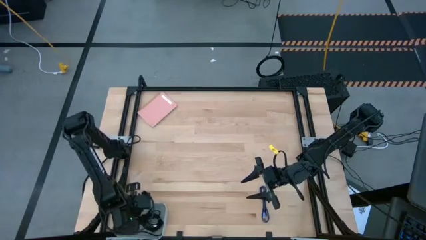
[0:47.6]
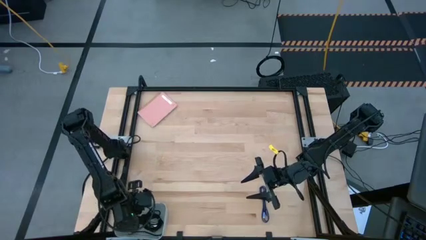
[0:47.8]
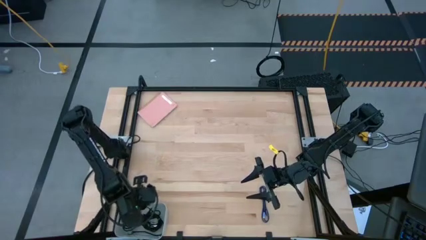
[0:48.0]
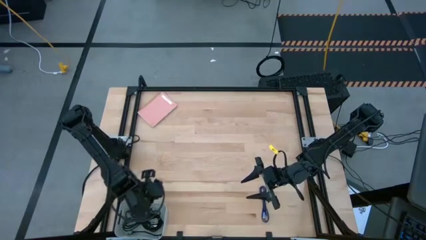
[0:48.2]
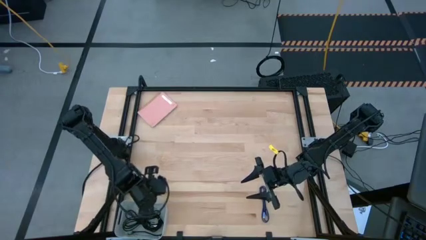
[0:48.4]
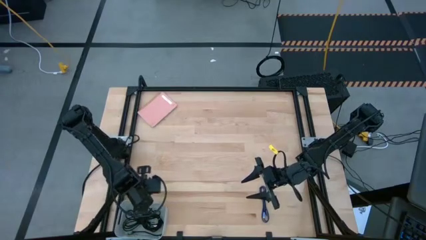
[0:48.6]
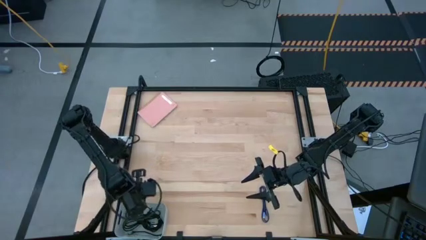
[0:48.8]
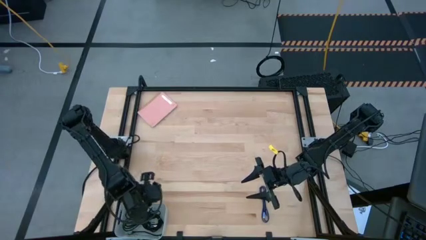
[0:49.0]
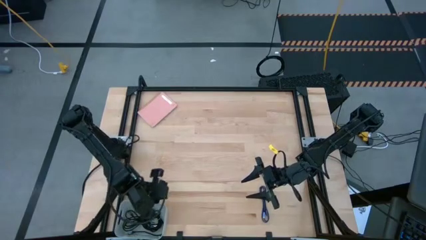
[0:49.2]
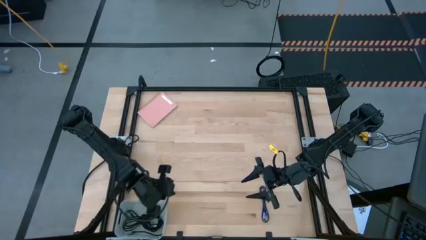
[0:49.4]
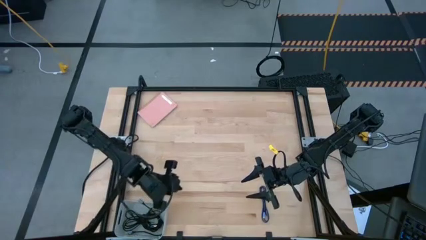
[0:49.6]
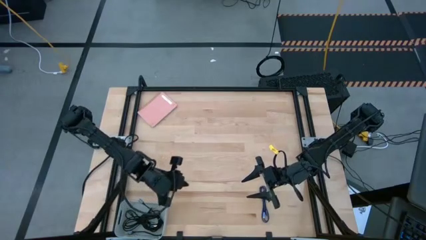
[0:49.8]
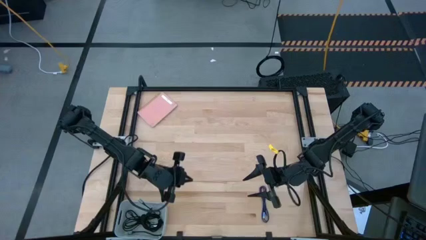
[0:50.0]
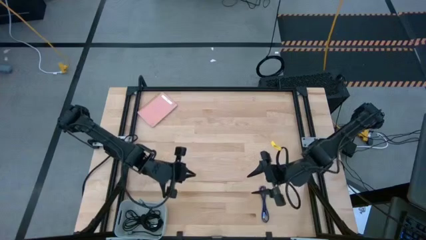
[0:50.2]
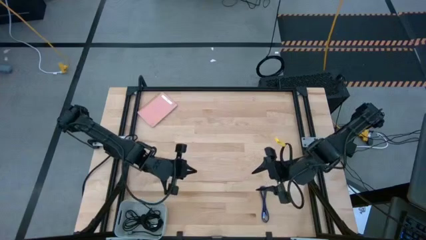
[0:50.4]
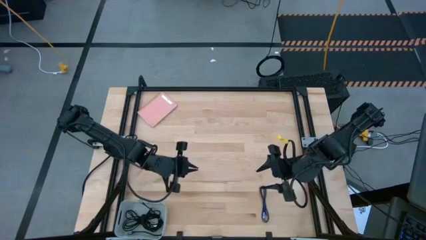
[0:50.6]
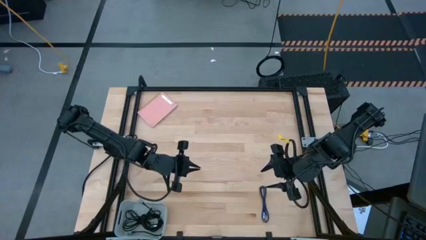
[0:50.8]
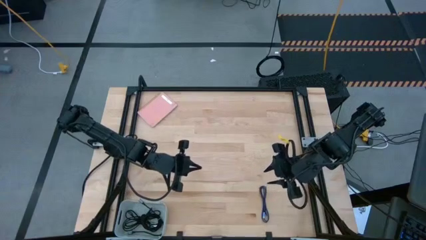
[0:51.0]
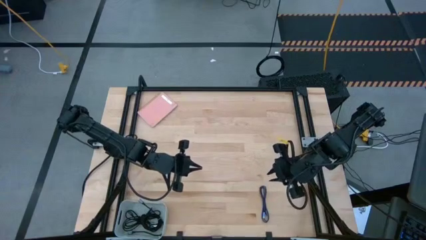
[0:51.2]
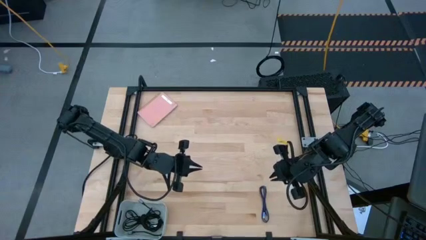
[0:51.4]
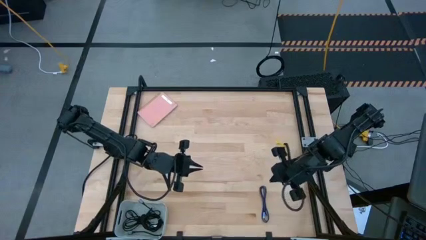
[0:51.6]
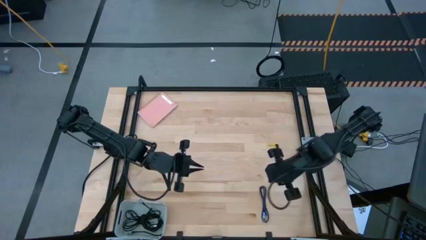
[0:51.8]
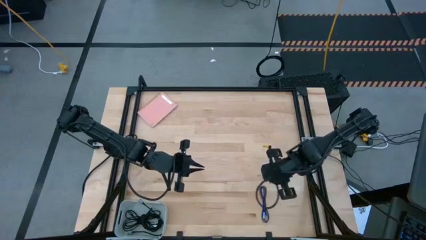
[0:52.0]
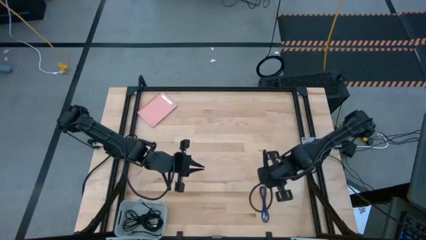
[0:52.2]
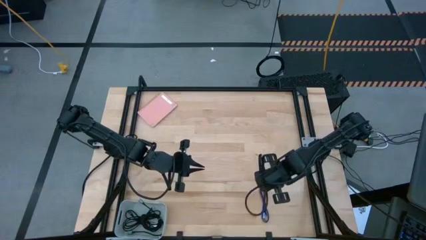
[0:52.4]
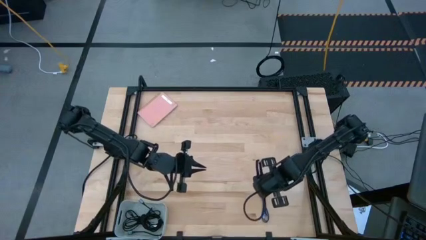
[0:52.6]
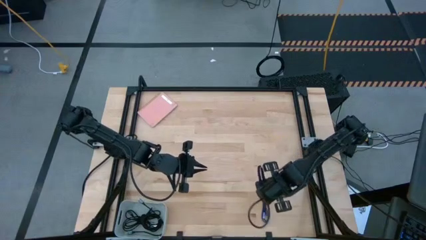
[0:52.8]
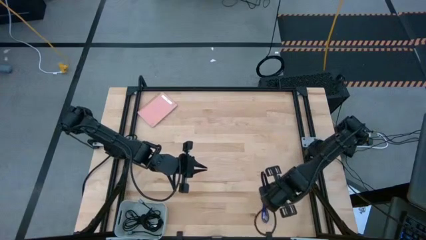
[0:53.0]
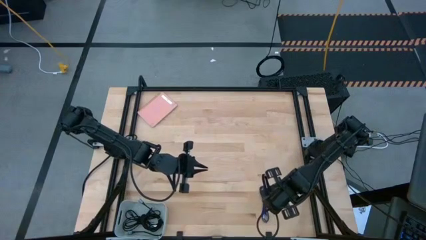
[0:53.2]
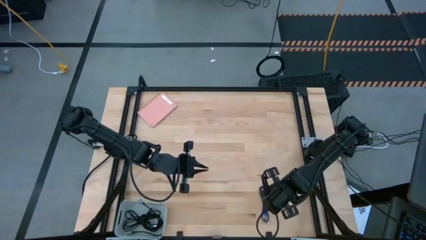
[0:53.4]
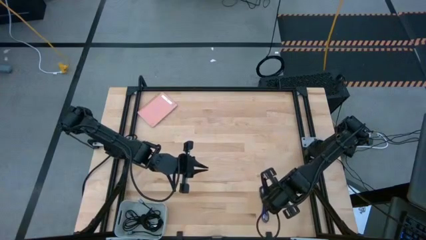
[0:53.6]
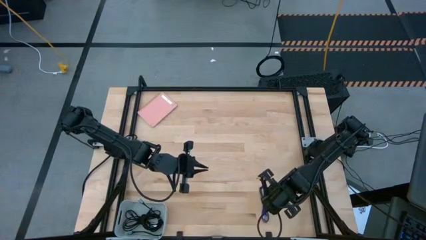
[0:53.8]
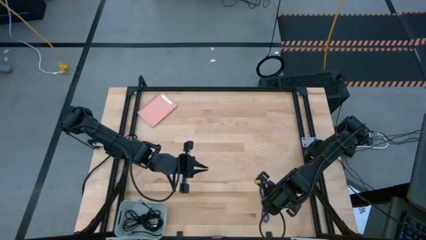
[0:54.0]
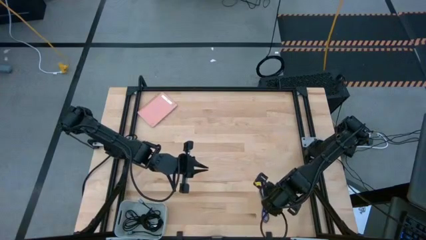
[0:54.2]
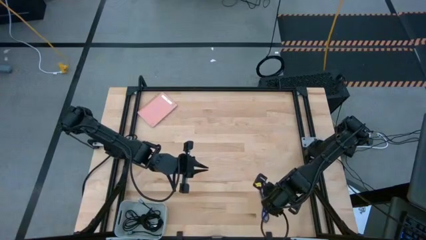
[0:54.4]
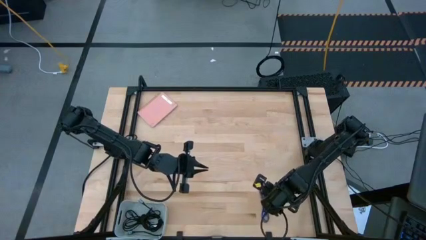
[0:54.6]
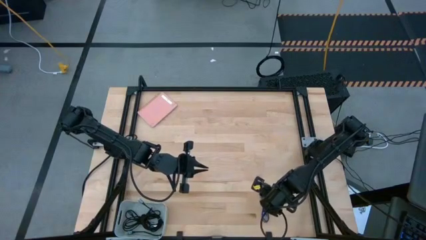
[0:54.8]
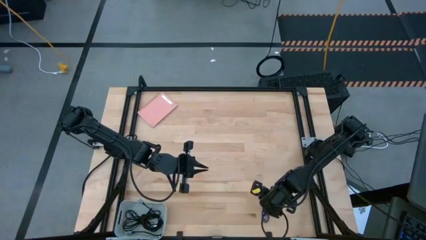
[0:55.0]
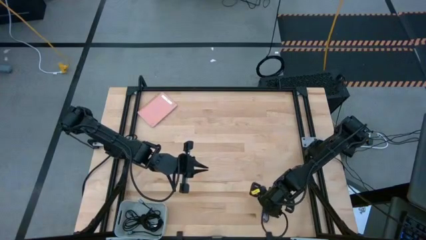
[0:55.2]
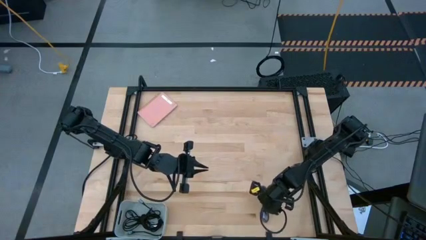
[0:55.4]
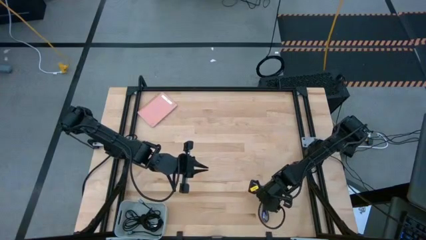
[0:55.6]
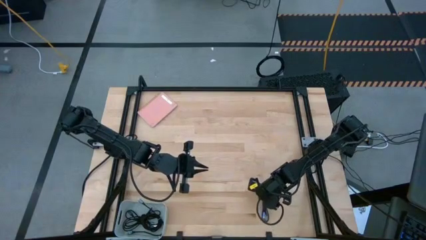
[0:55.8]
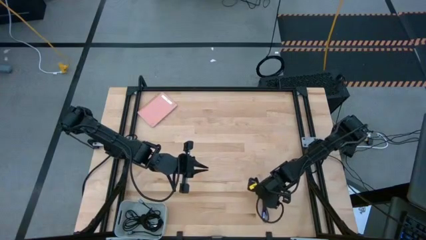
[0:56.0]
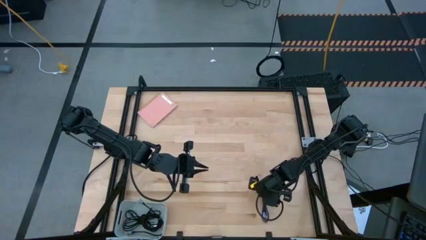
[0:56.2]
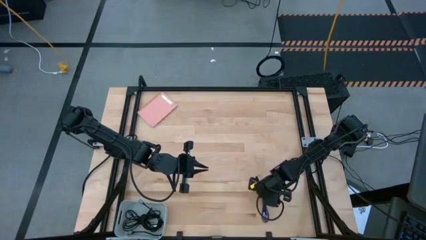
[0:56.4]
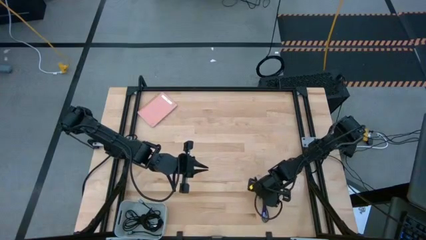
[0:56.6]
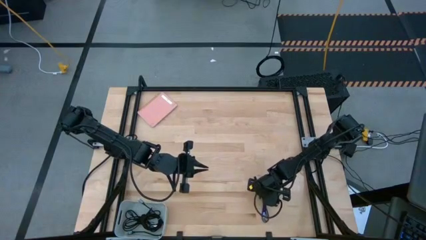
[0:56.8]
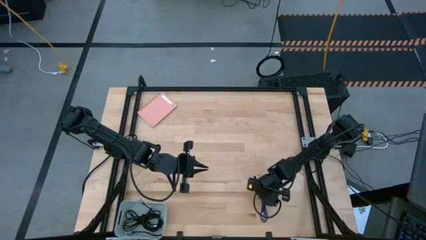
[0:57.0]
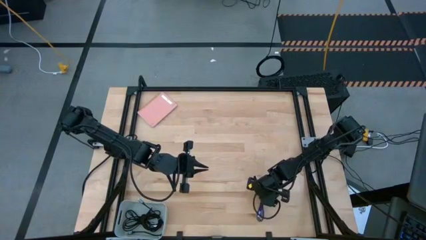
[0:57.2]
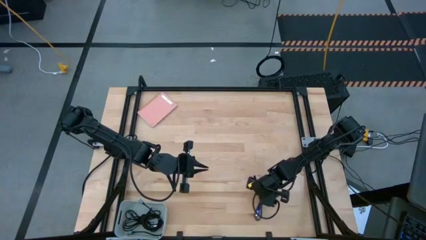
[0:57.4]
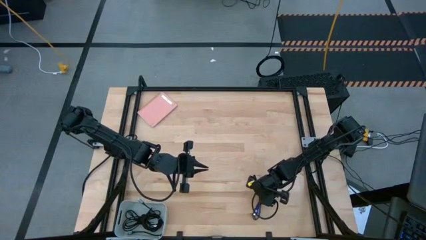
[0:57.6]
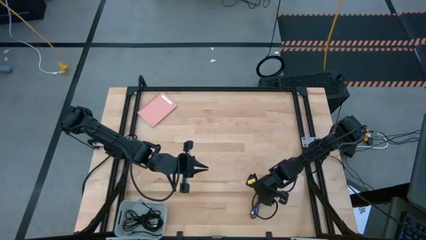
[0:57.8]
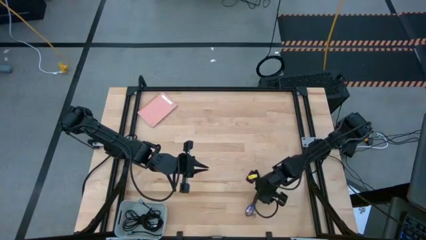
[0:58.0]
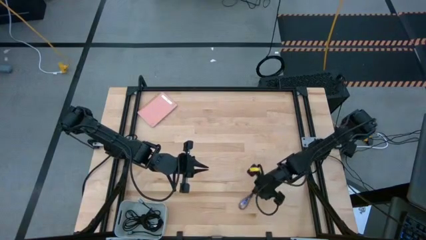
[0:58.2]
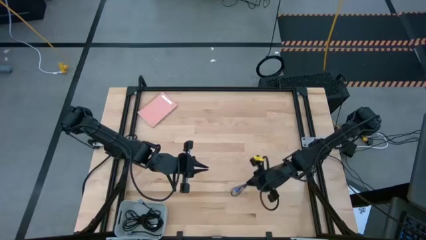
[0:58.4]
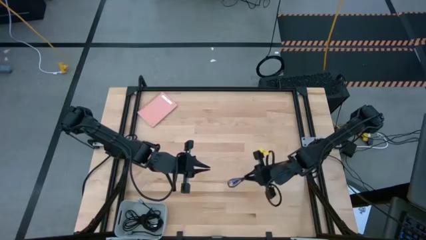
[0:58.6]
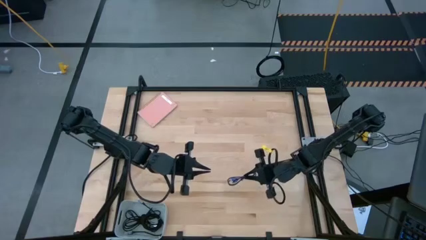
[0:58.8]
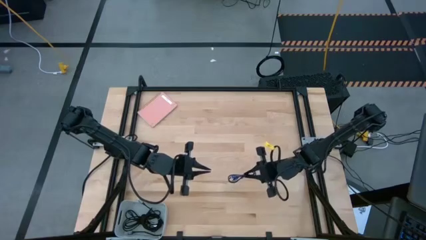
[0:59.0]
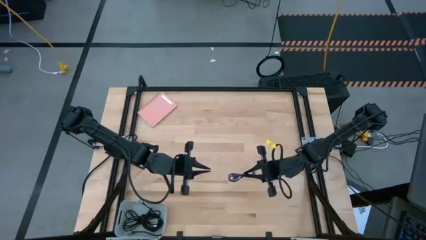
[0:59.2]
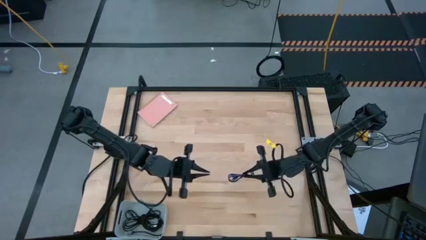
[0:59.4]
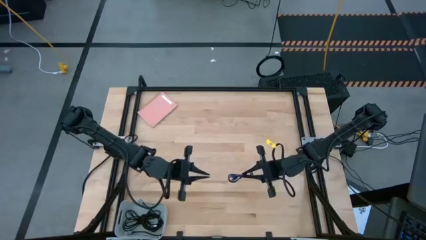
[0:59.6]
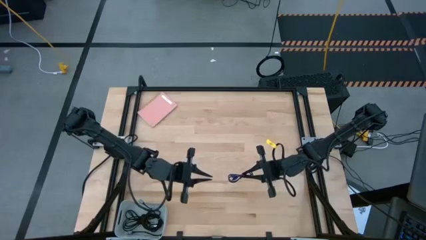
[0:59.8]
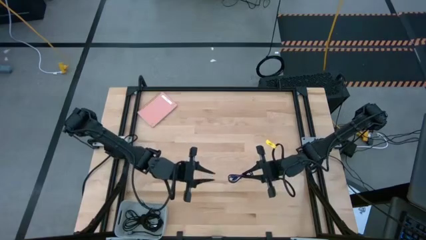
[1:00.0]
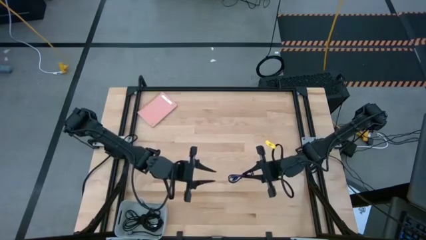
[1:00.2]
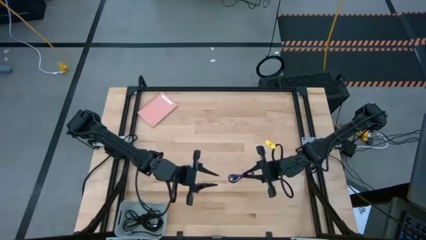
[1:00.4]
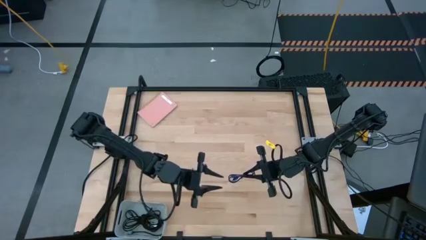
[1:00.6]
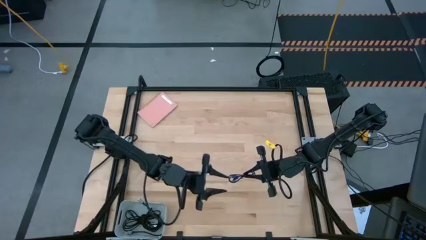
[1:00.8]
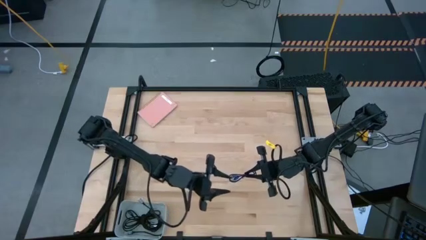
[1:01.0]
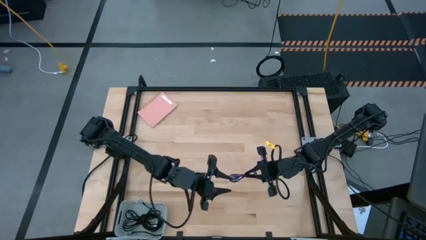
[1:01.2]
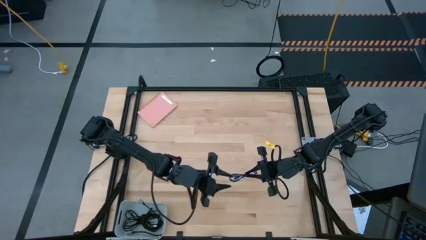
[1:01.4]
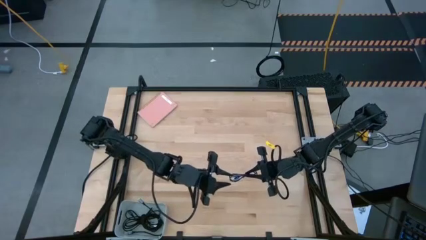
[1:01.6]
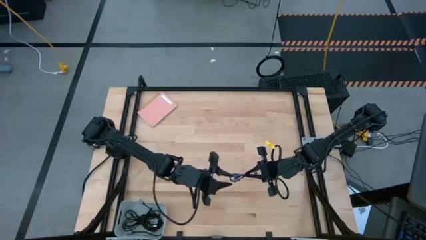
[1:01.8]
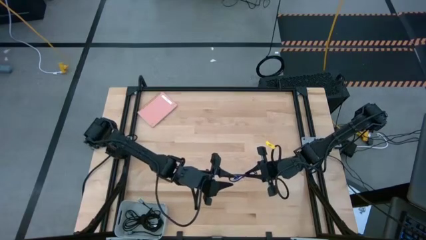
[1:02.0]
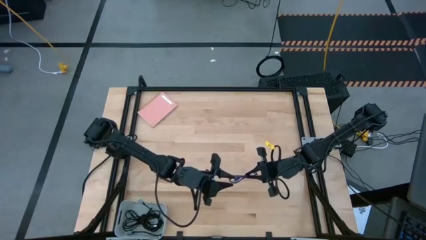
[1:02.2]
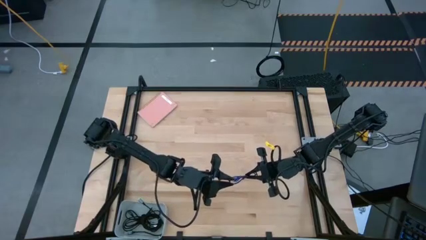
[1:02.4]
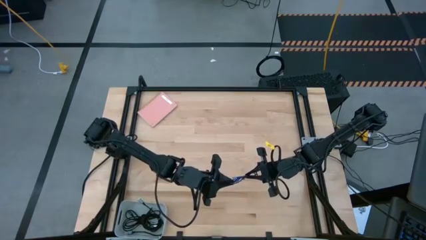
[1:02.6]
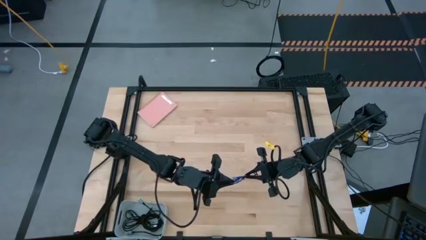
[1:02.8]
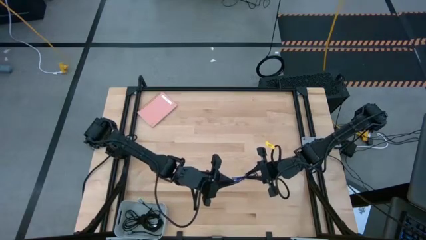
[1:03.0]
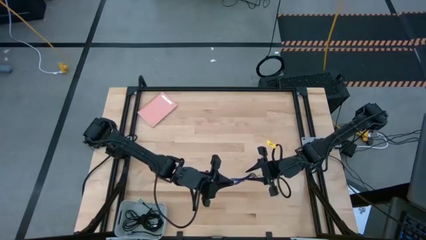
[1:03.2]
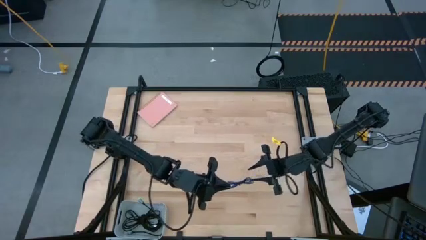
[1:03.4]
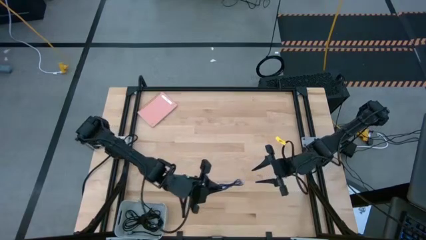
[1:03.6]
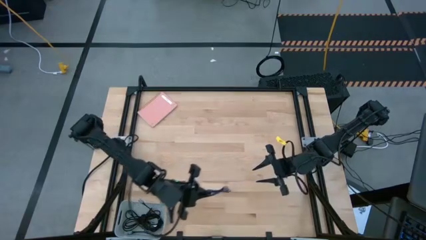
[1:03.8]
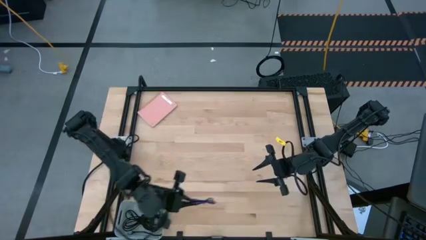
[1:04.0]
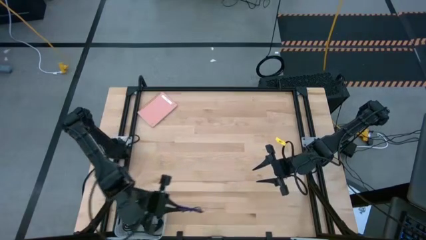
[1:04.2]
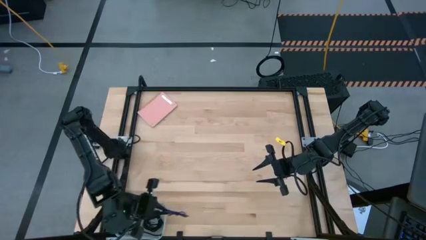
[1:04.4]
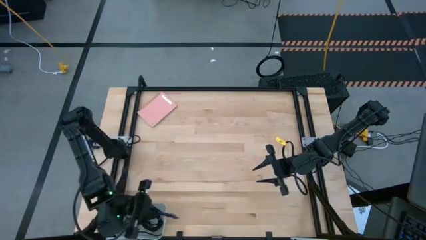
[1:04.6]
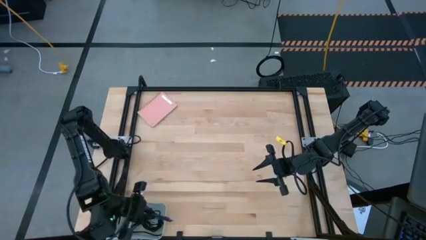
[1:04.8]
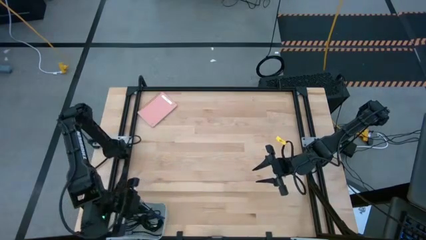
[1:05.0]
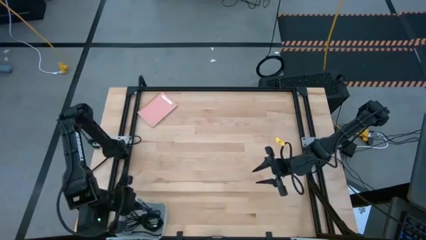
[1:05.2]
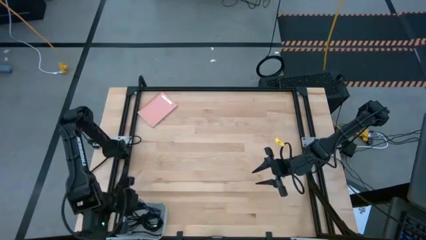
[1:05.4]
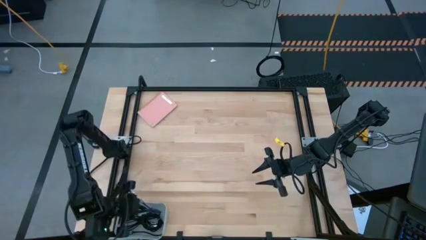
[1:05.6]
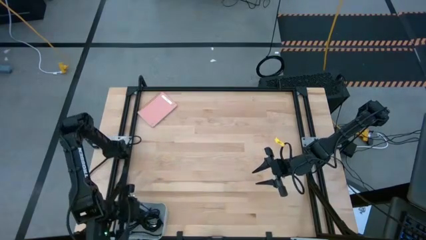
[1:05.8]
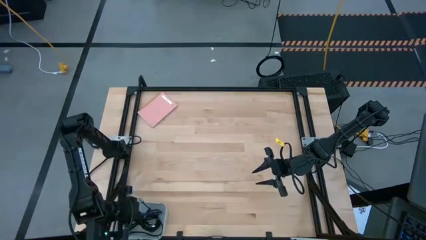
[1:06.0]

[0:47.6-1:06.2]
Task: Pick and place USB-C Cables
Put the blue charger cable into the white bin
